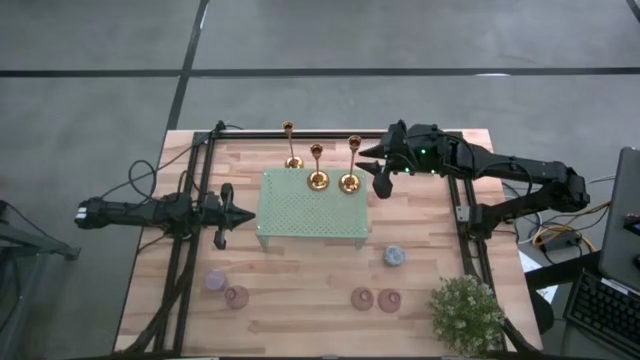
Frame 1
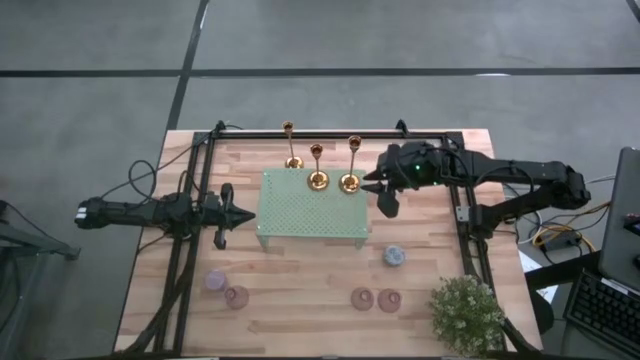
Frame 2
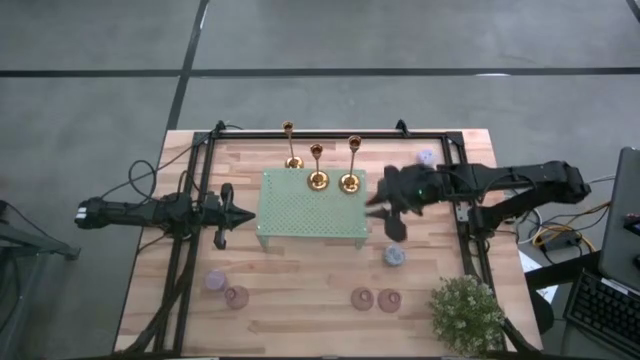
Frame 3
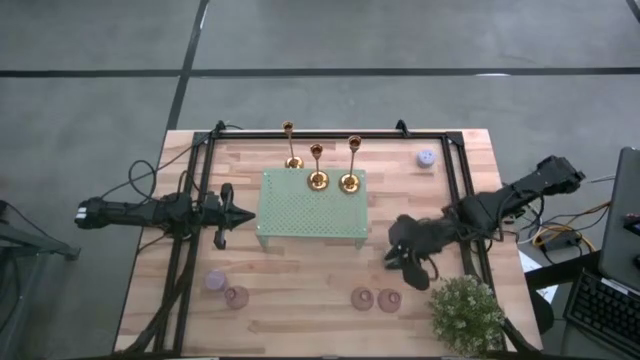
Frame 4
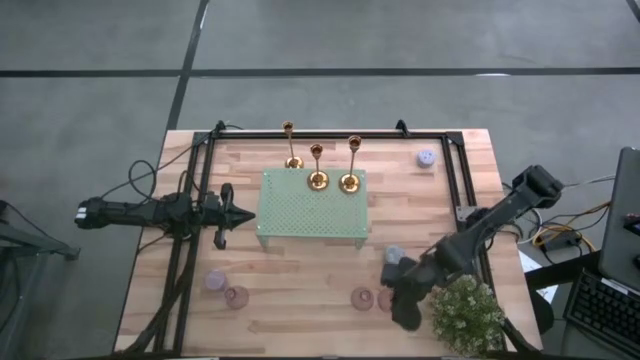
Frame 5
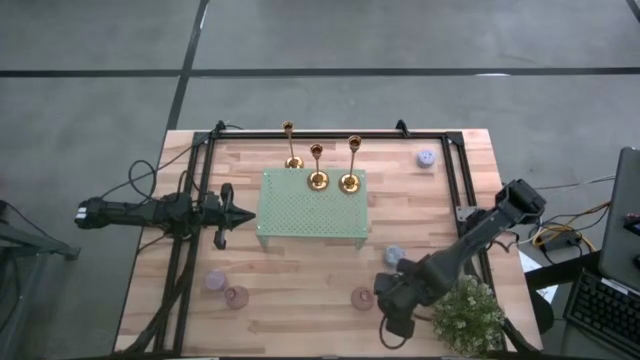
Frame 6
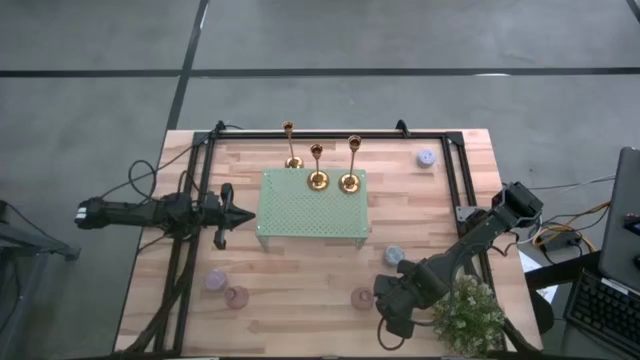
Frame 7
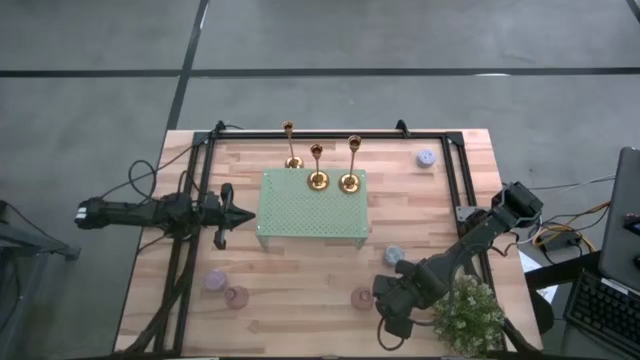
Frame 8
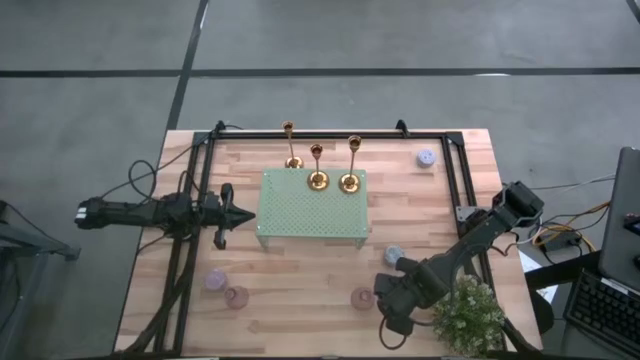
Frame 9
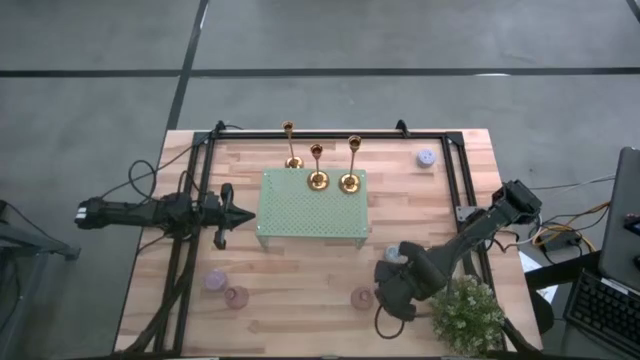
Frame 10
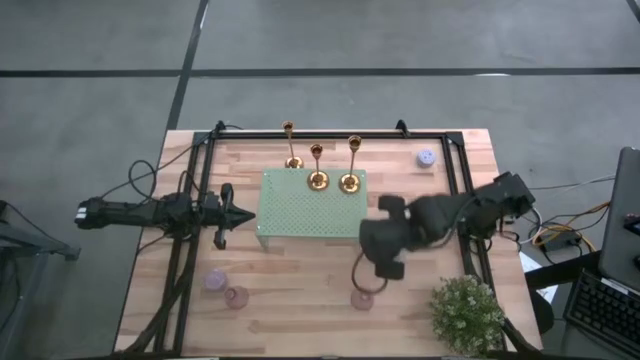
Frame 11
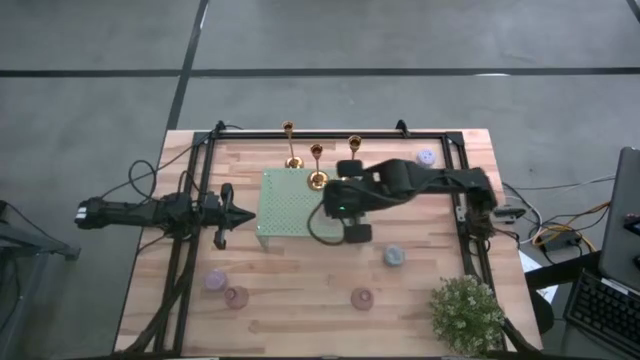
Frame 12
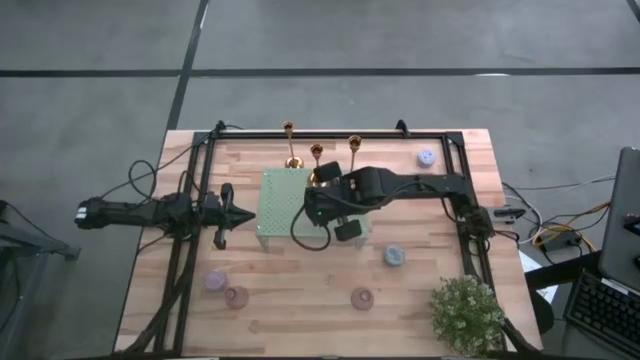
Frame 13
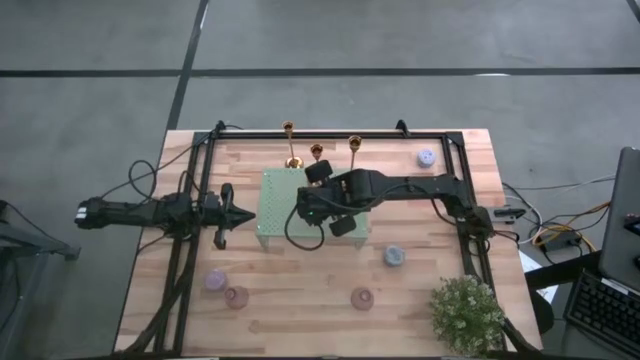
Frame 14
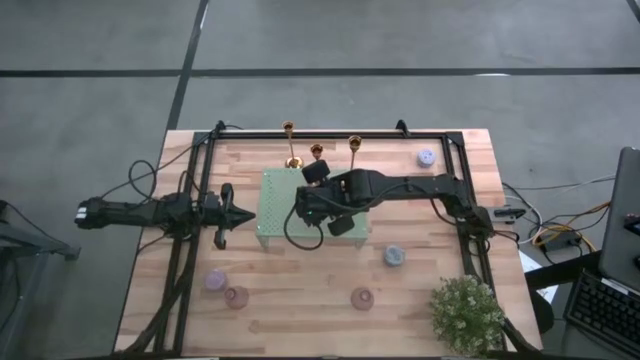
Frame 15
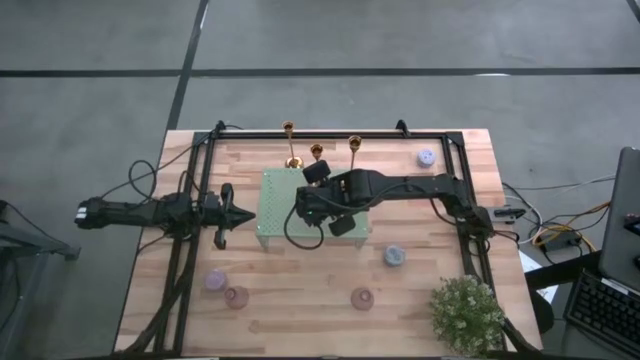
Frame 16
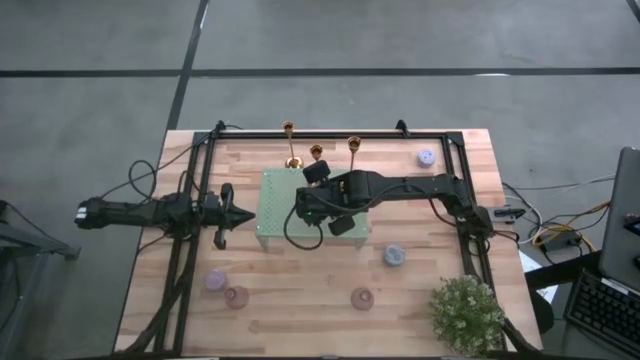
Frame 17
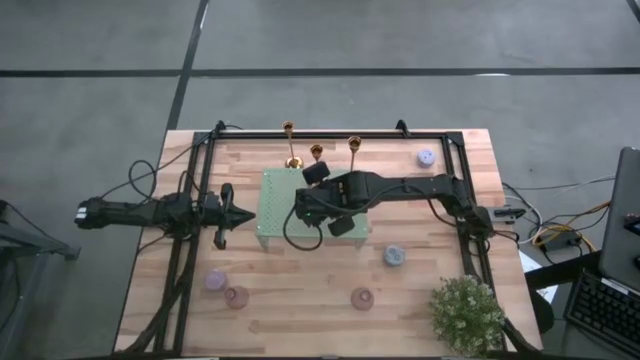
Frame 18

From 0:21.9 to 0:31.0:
Task: Pick & Place candle stick holders
Put the right transparent glass candle holder on the shelf

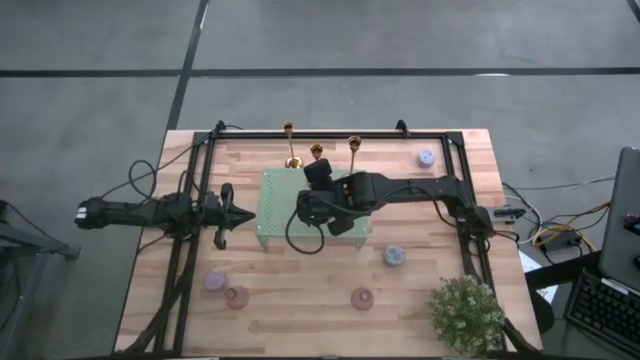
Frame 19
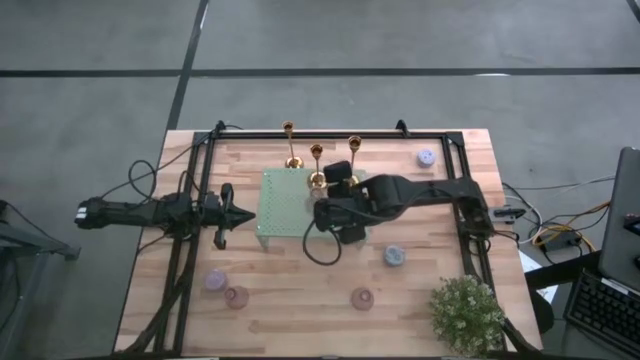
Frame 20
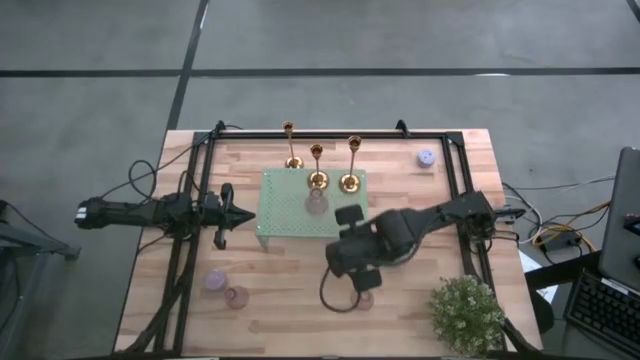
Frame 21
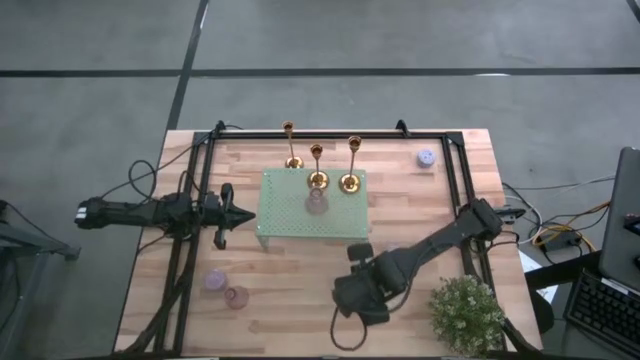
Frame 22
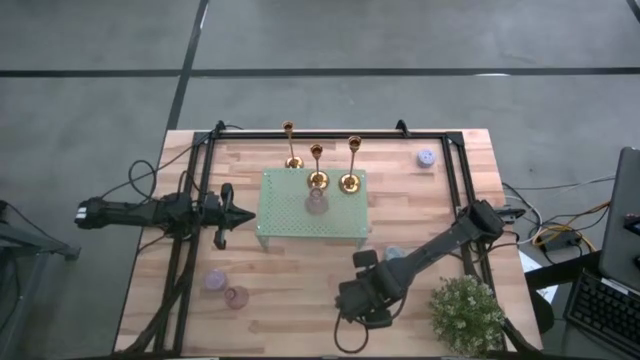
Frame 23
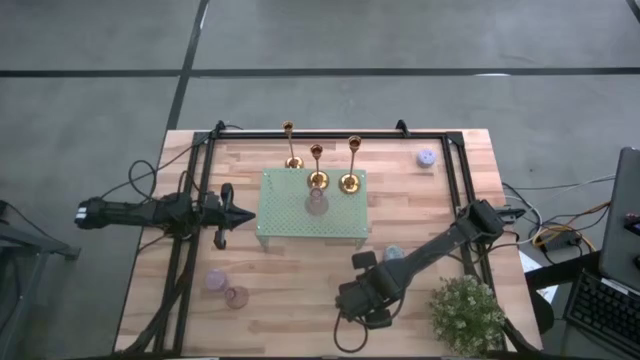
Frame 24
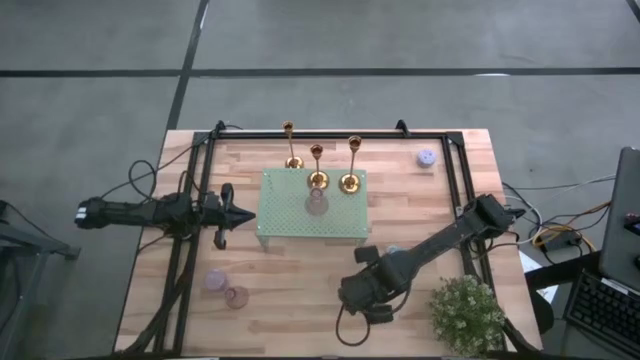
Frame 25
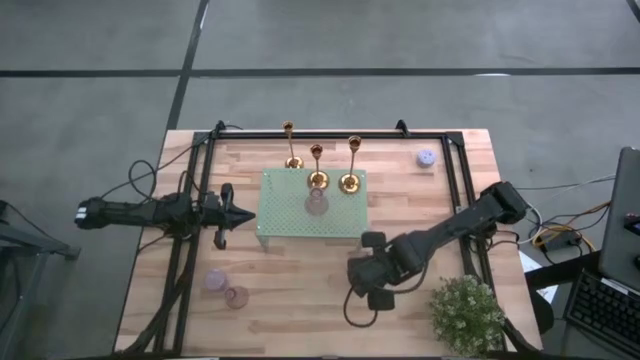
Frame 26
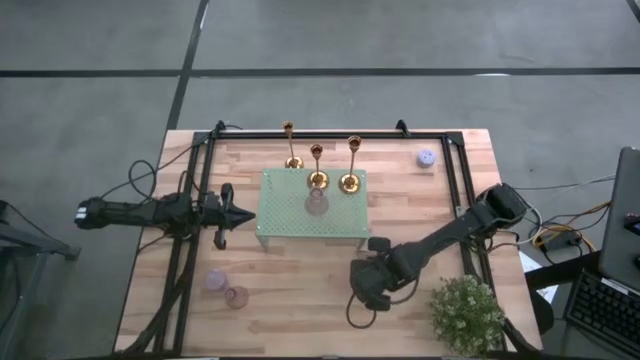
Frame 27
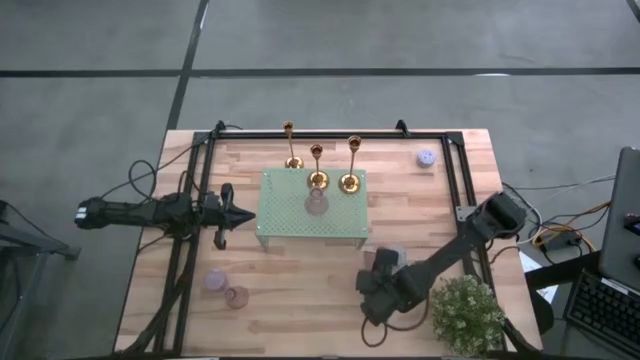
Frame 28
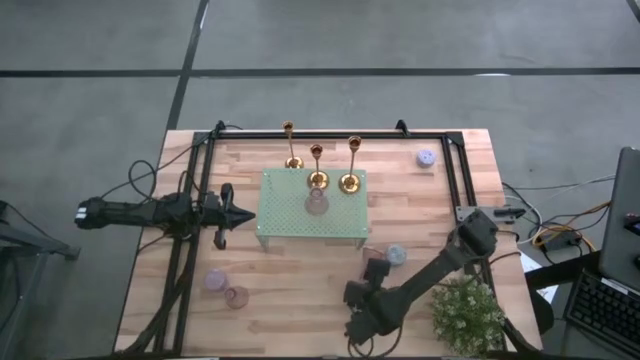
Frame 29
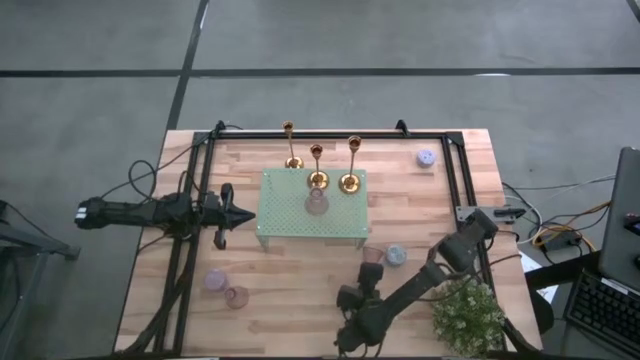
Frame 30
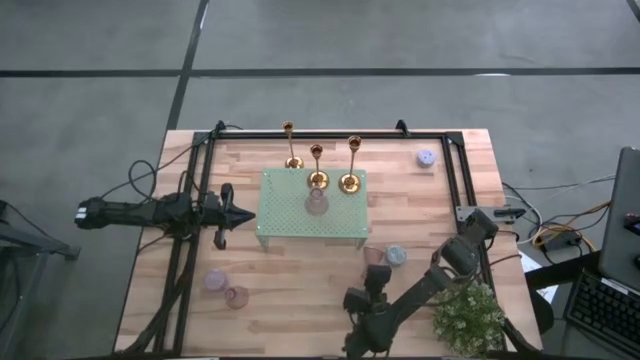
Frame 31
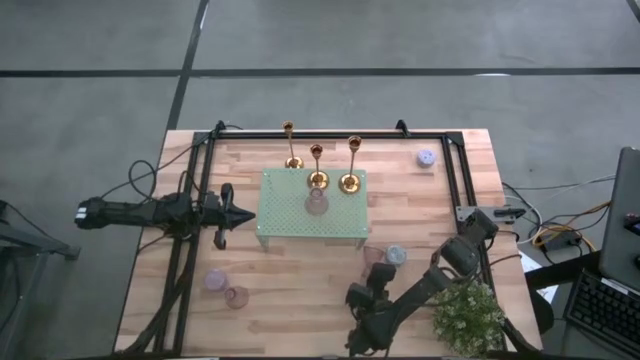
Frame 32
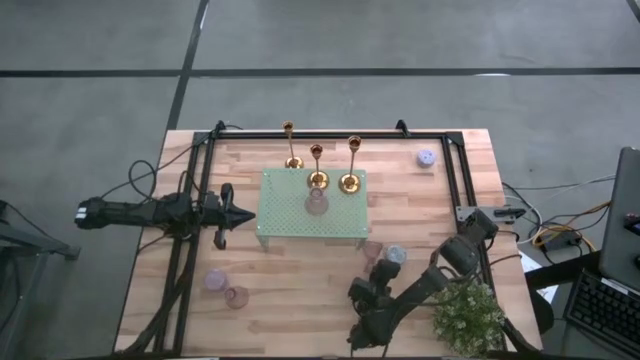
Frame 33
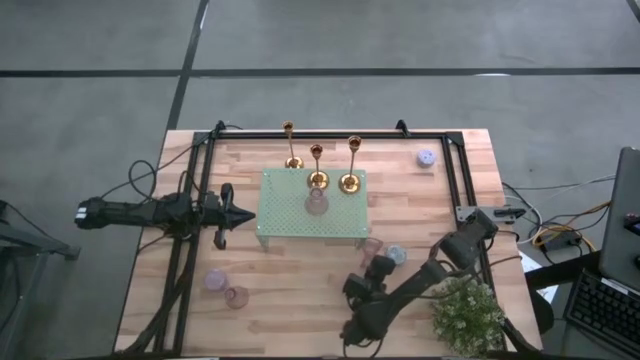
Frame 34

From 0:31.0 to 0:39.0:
Put the right transparent glass candle holder on the shelf aligned with the other transparent glass candle holder

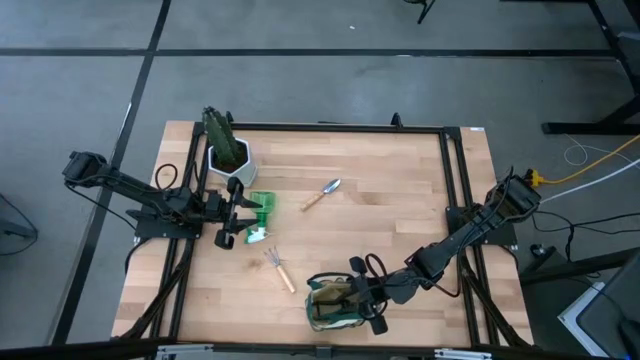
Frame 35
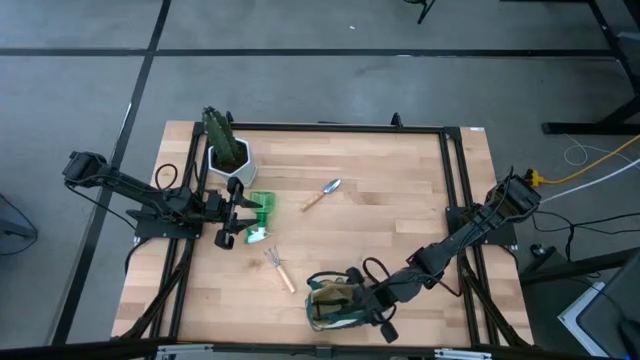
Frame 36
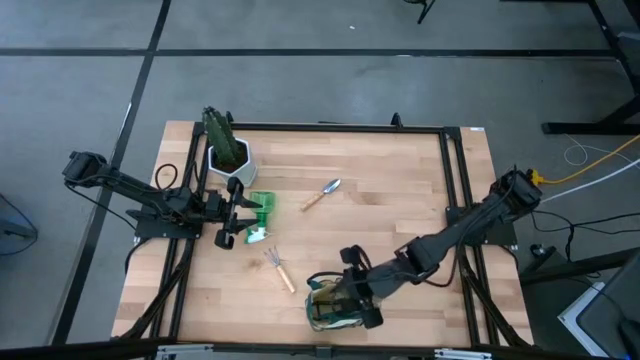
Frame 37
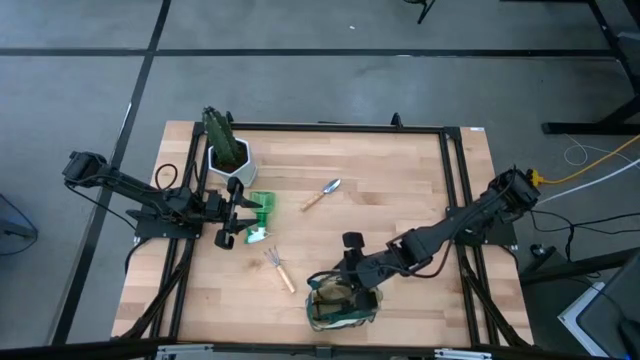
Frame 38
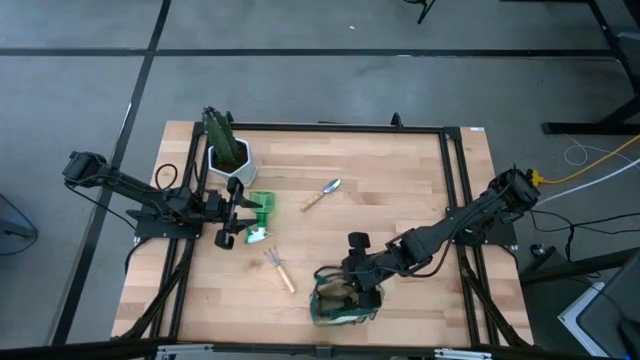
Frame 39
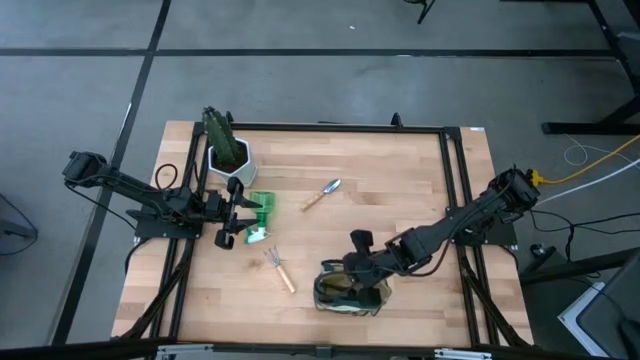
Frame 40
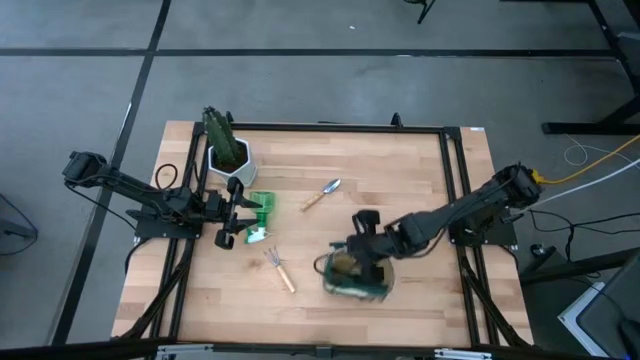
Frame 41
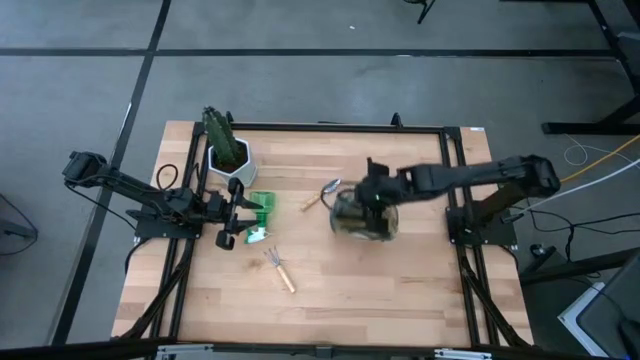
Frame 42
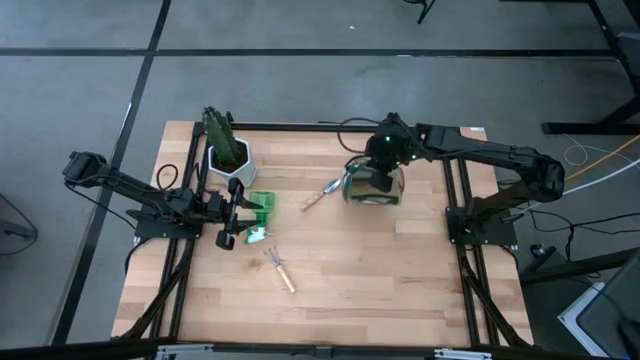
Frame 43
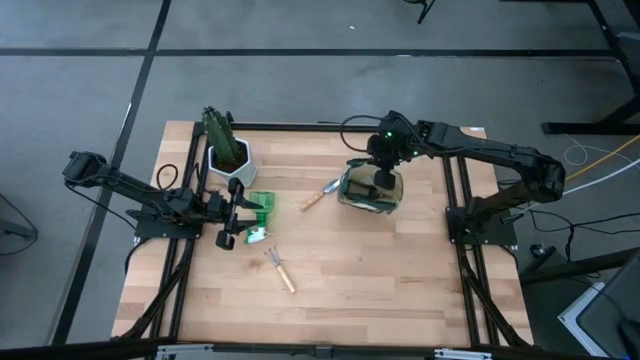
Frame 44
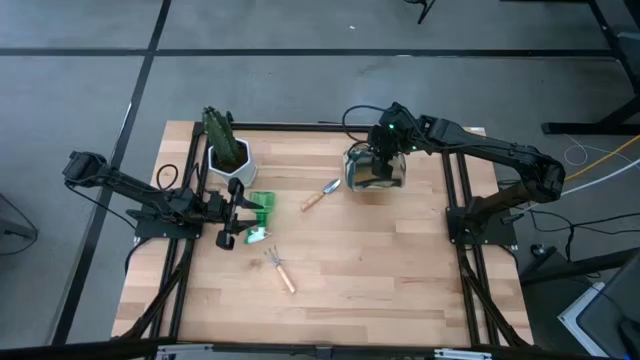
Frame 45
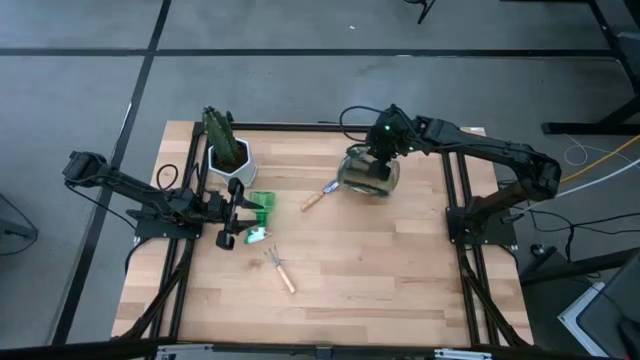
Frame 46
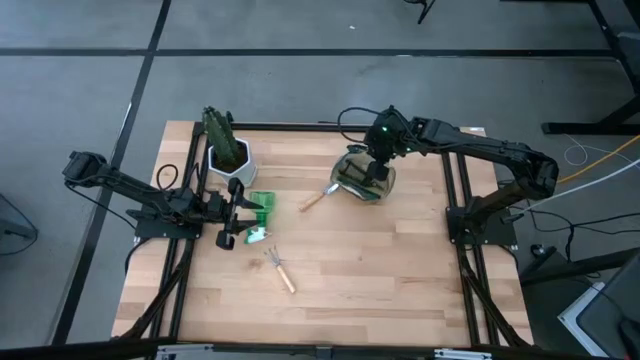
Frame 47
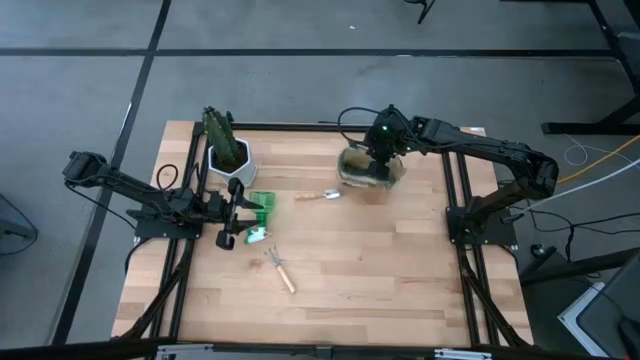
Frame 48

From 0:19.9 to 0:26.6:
Task: Pick & Place Garden tools in Gardening bag
Move the brown gardening bag to the top of the table
